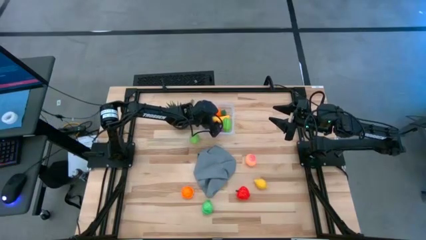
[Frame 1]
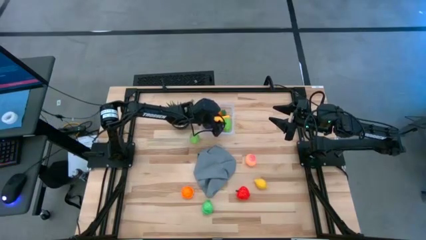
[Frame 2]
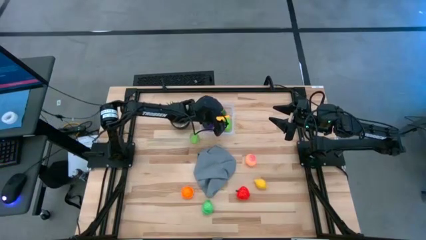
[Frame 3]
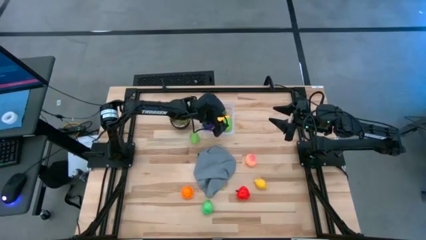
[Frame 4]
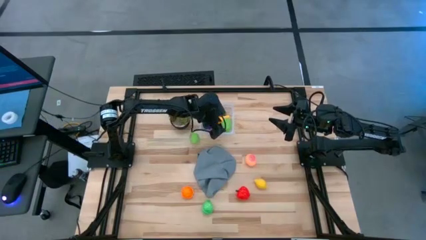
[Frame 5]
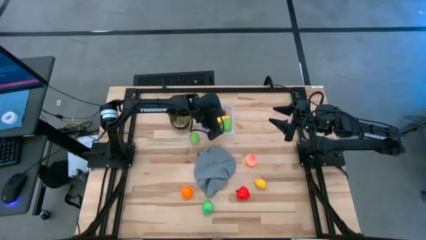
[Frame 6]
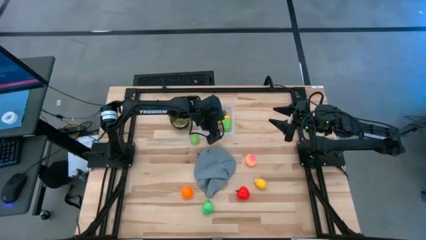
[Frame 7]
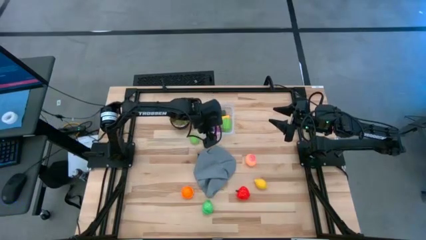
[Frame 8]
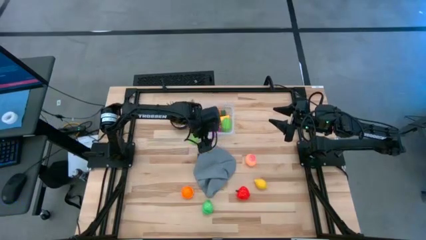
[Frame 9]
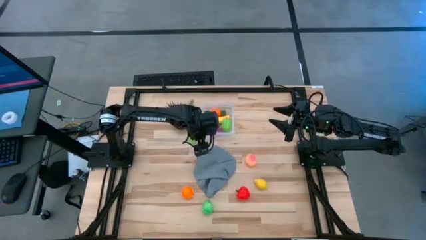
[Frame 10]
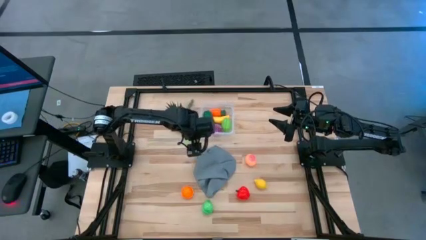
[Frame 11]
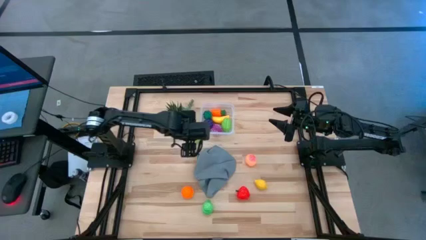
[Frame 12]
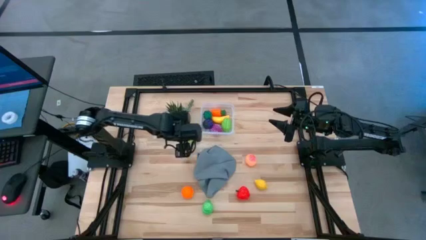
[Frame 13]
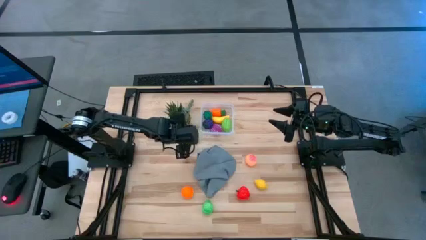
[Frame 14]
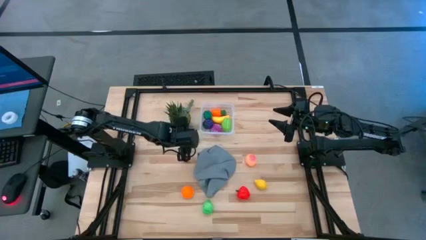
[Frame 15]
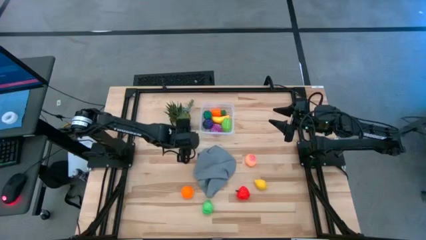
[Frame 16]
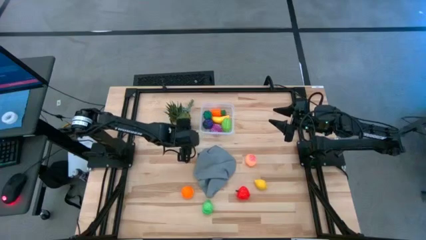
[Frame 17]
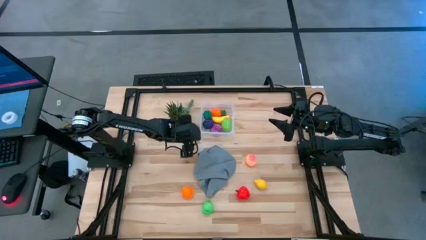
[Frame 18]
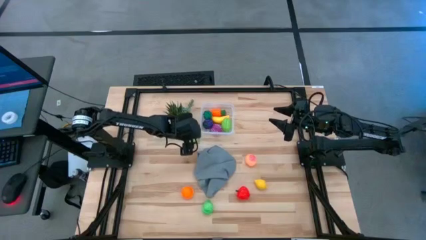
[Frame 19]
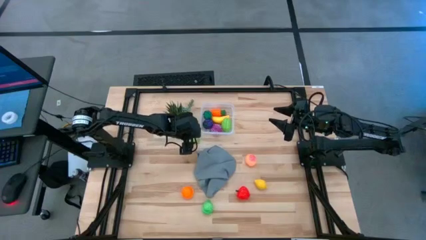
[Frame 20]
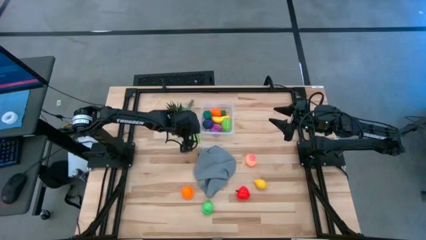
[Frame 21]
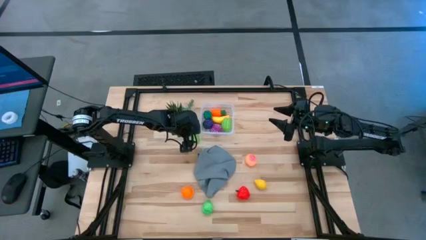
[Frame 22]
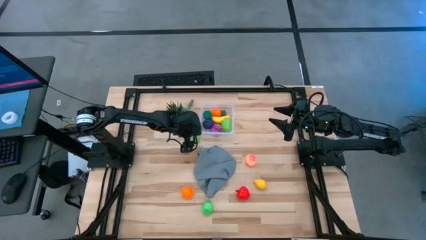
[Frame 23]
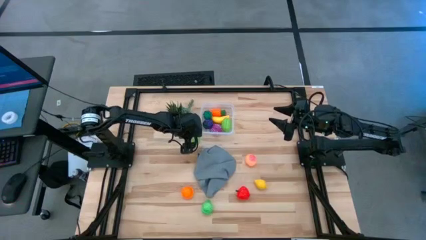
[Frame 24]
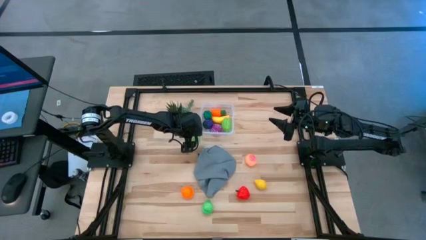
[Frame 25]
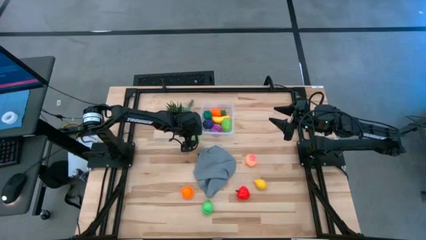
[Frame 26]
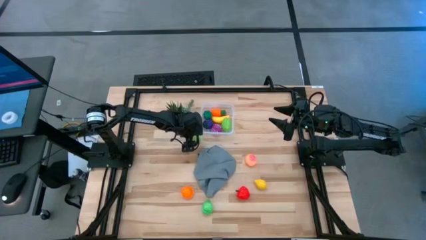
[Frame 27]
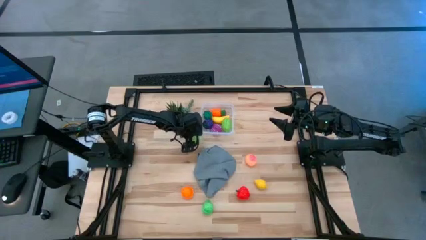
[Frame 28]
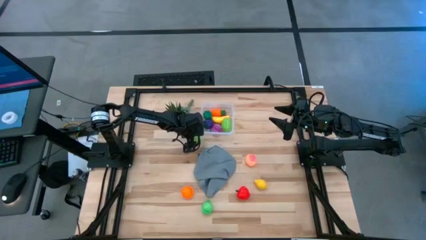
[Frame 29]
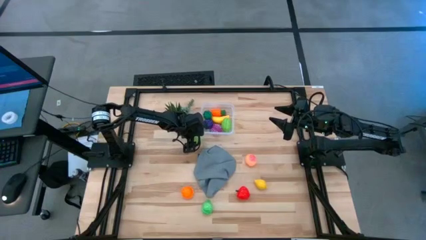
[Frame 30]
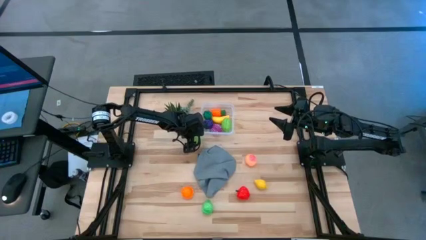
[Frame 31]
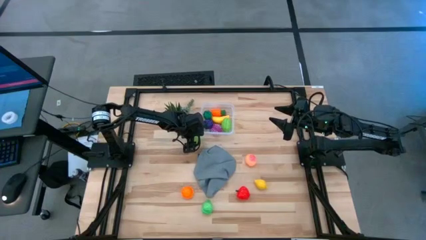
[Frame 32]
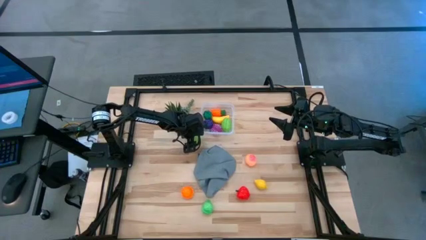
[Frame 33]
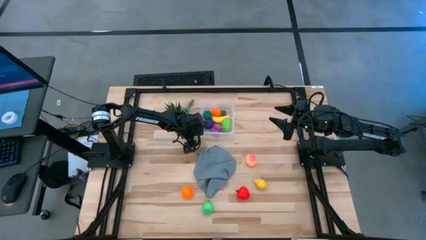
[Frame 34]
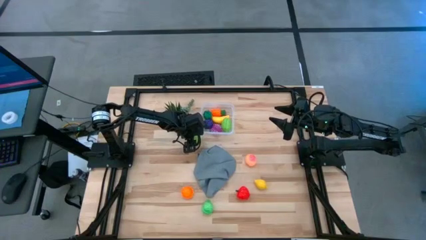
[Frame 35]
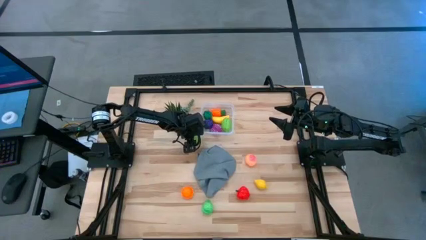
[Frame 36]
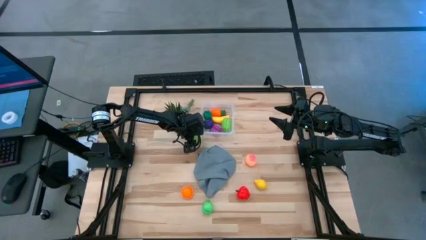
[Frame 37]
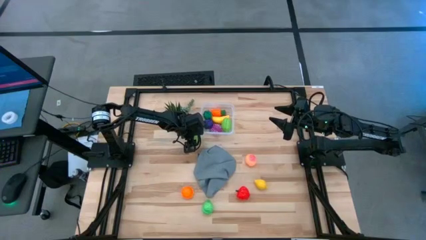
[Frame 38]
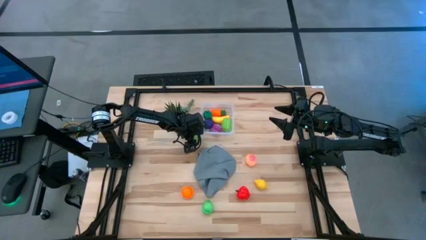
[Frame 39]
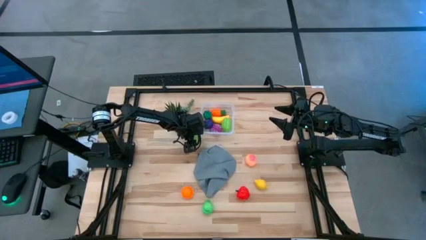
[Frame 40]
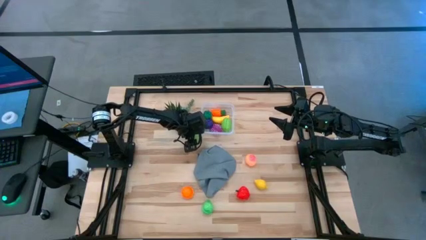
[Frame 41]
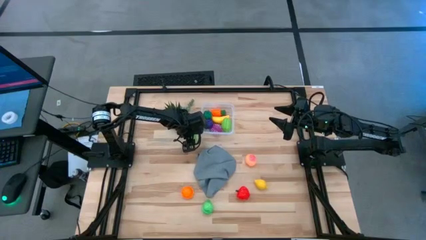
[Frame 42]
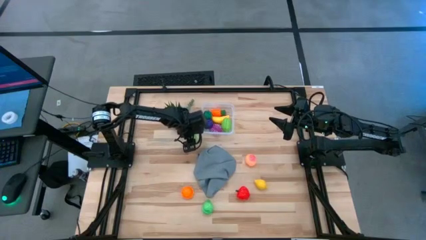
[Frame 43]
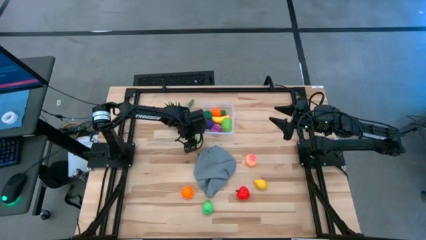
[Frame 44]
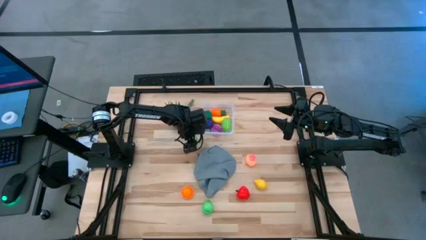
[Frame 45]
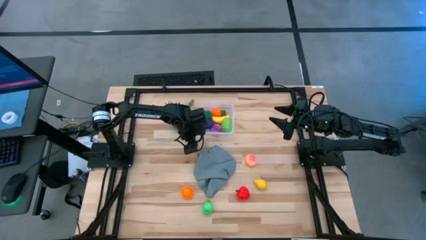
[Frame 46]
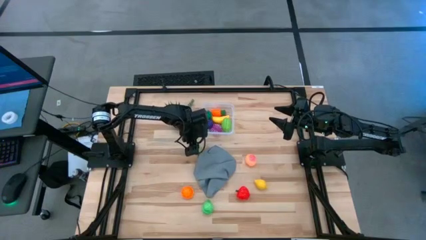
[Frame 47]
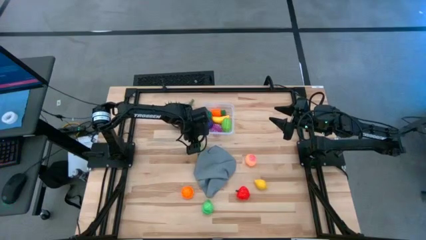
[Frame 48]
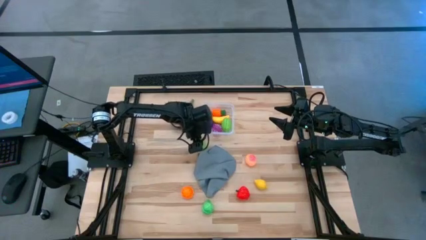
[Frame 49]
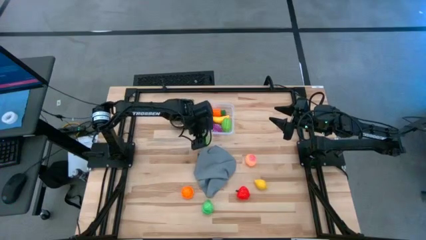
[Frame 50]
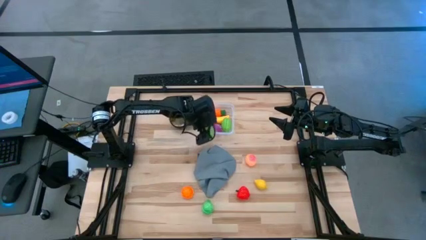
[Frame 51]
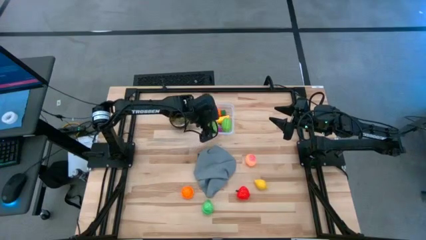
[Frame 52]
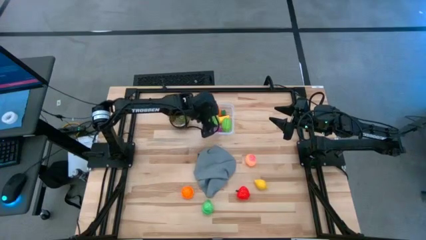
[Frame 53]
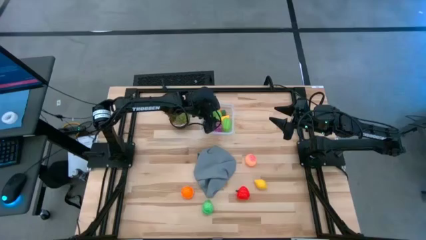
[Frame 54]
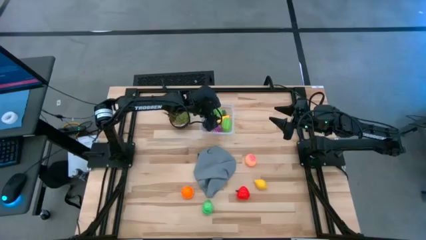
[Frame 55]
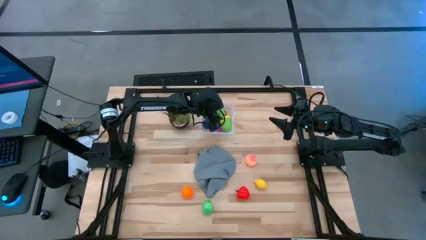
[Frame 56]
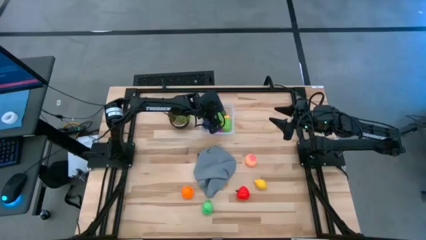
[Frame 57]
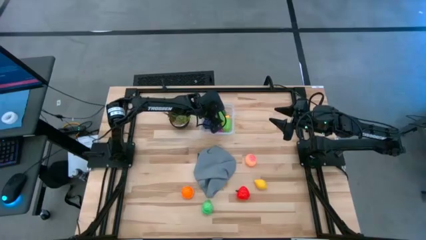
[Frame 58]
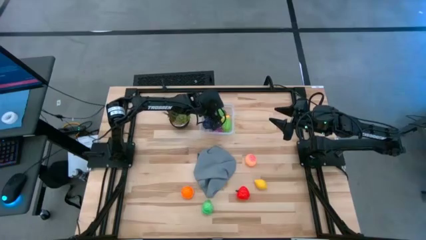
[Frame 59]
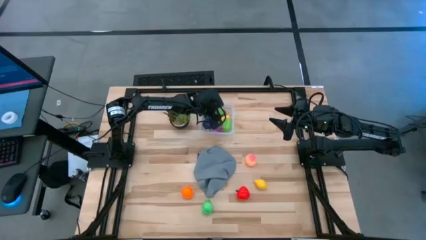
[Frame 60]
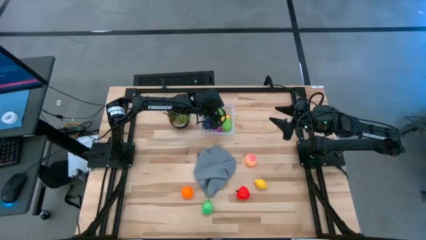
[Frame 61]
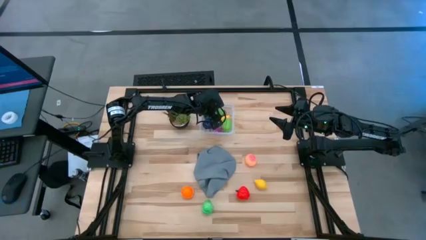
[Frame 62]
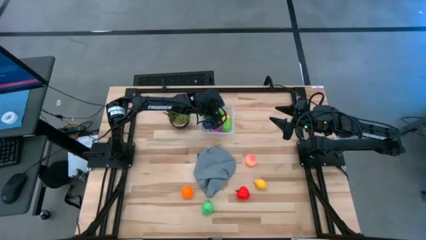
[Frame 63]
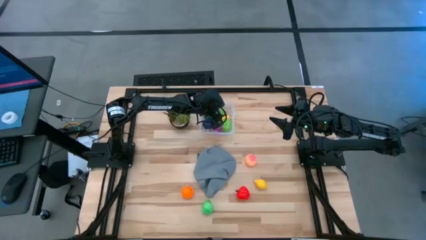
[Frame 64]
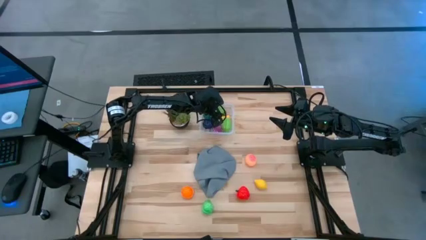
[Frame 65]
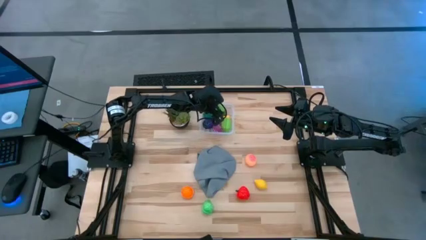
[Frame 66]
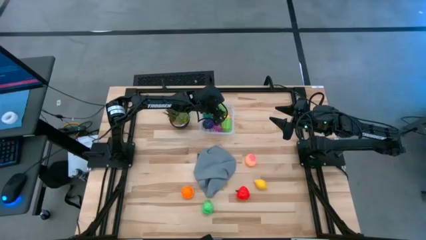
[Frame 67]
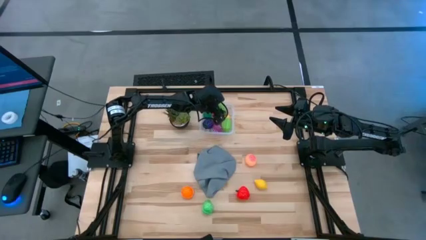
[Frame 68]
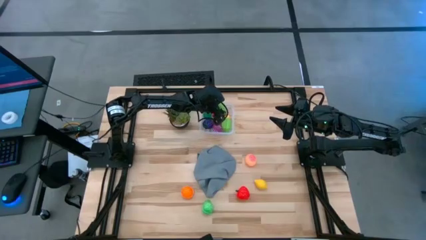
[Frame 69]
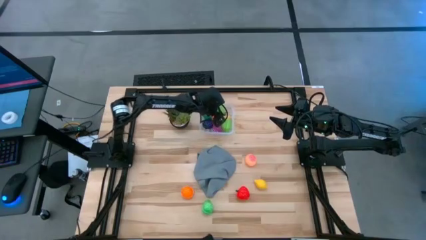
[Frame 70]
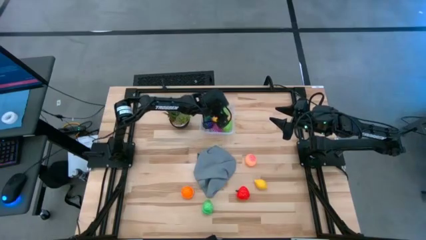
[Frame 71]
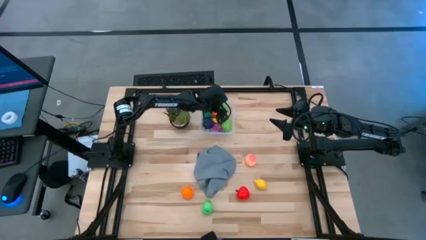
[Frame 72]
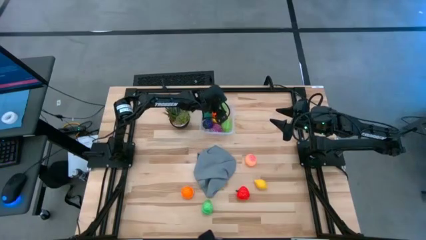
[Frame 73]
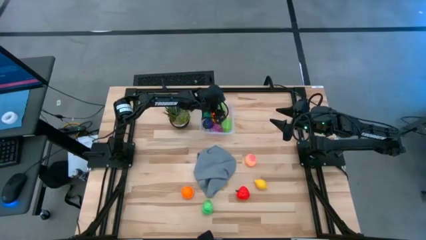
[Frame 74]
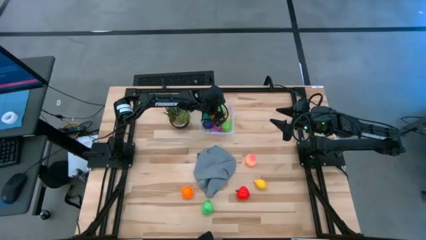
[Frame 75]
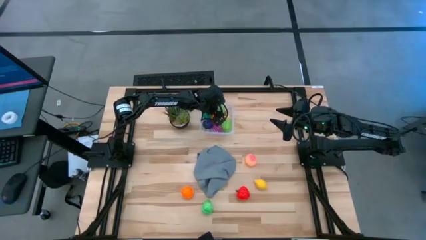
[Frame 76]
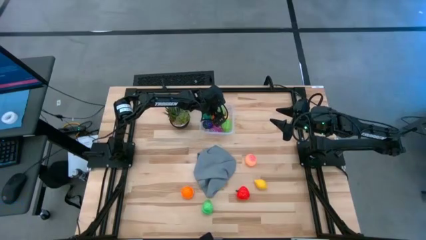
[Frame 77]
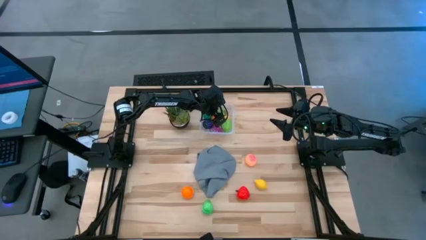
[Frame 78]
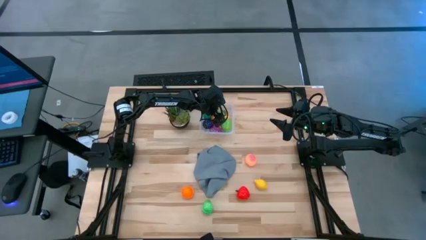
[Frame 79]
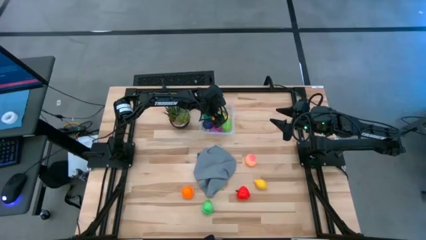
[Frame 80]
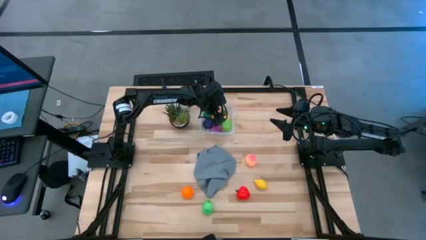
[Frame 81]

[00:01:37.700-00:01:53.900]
Task: Pick and placing Produce into tupperware
Put the green cabbage into the transparent container

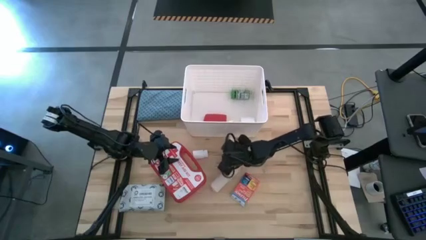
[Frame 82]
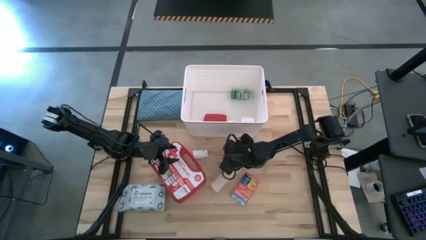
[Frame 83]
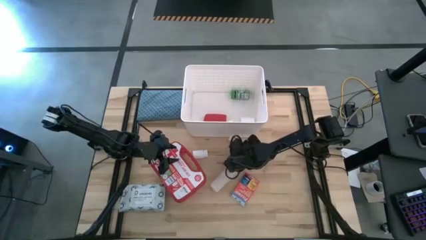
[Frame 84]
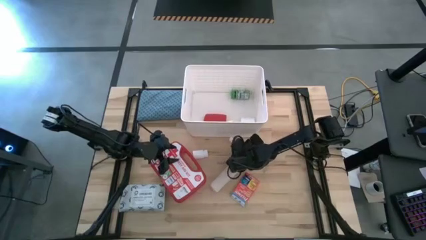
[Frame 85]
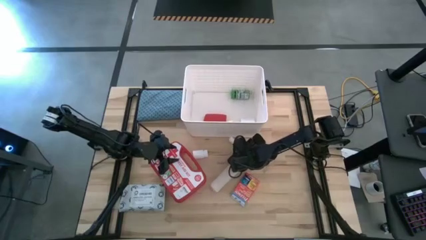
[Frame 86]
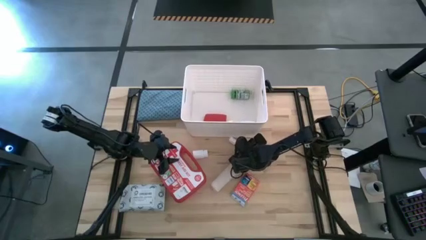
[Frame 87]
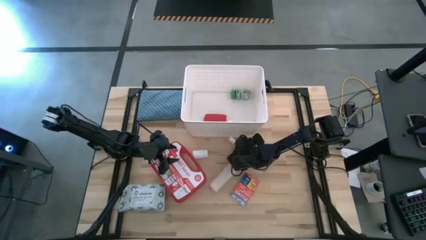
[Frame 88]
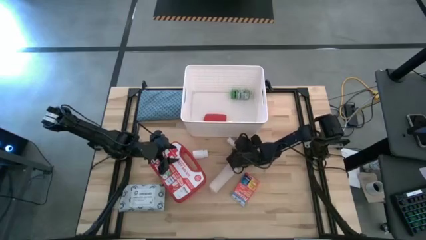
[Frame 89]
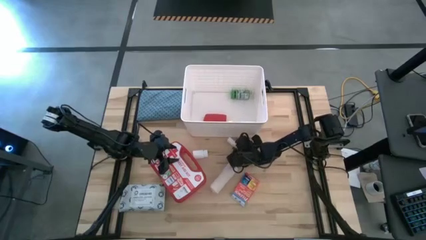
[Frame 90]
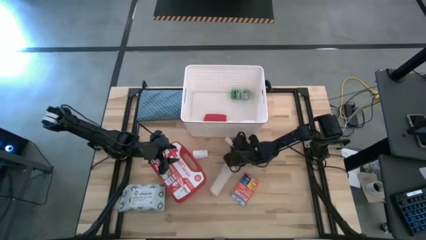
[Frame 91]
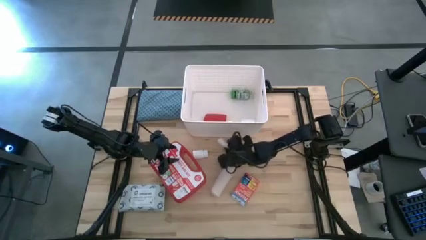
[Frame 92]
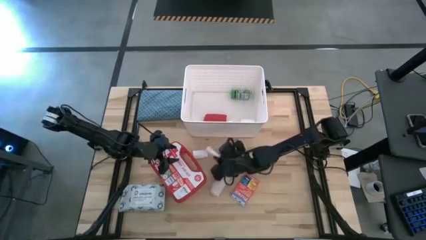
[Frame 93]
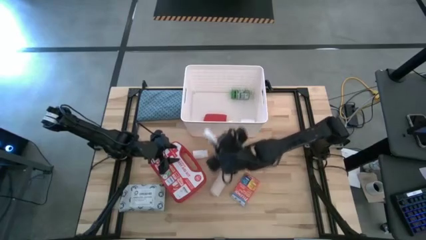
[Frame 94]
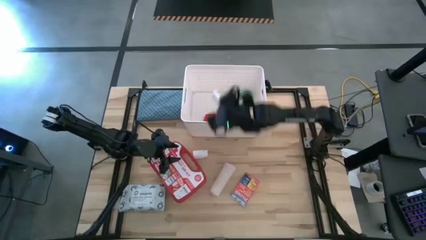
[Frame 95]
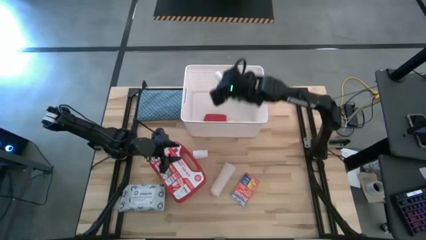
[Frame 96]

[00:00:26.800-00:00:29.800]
Task: Pick & place medical supplies in basket/bin
Put the rolled gauze in the white bin
